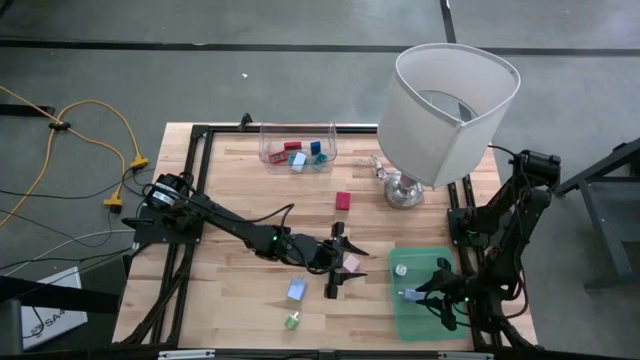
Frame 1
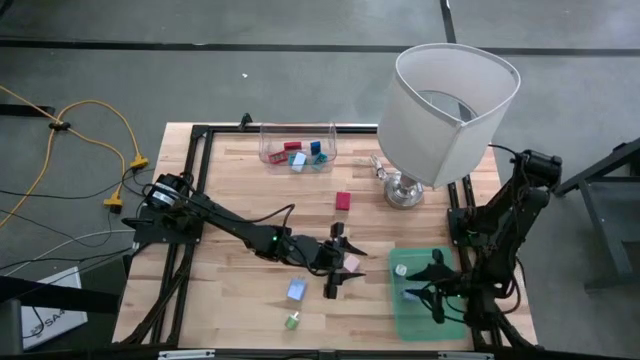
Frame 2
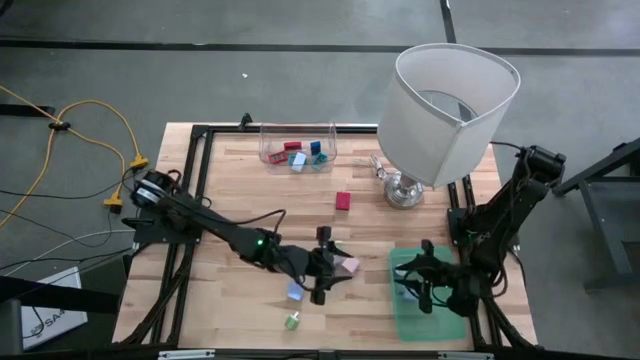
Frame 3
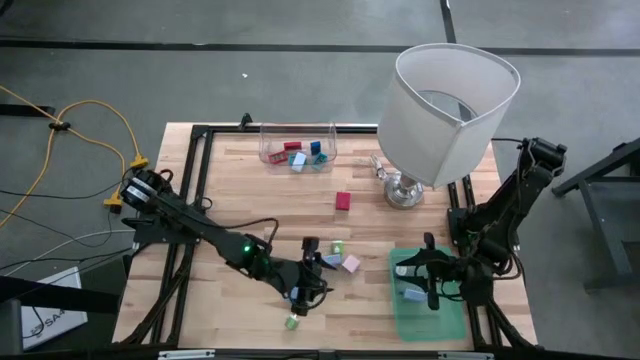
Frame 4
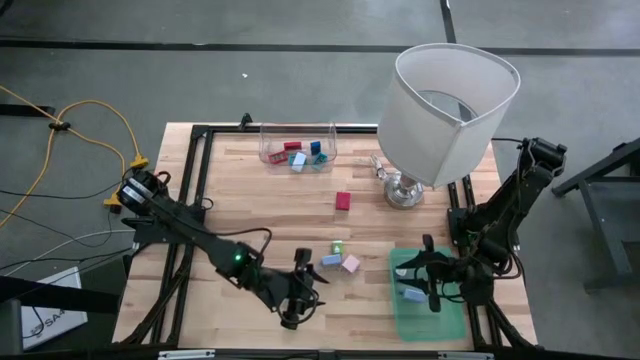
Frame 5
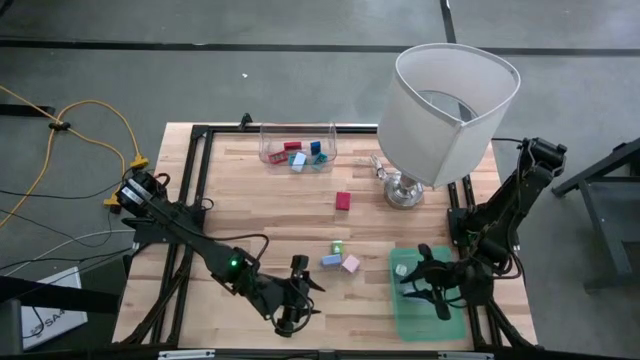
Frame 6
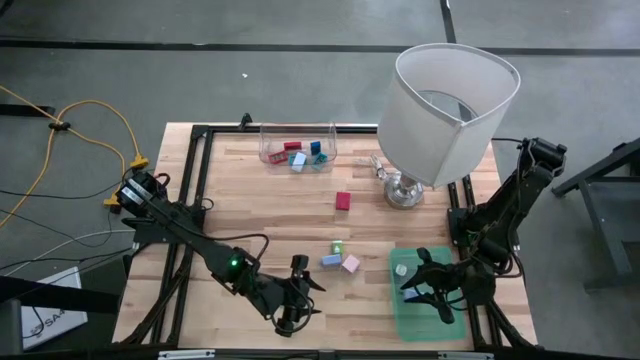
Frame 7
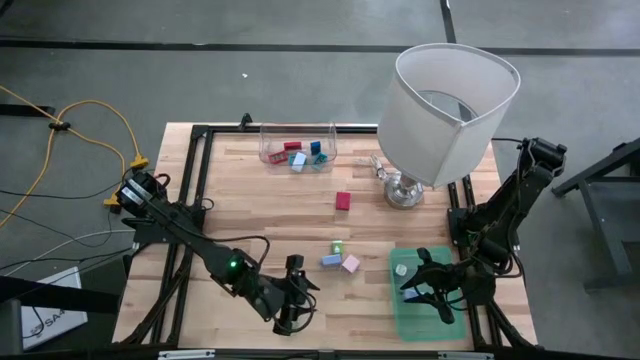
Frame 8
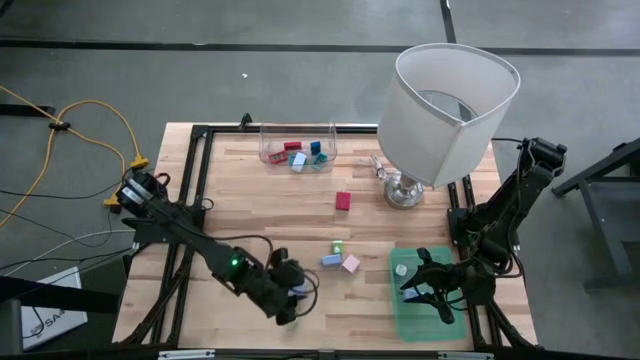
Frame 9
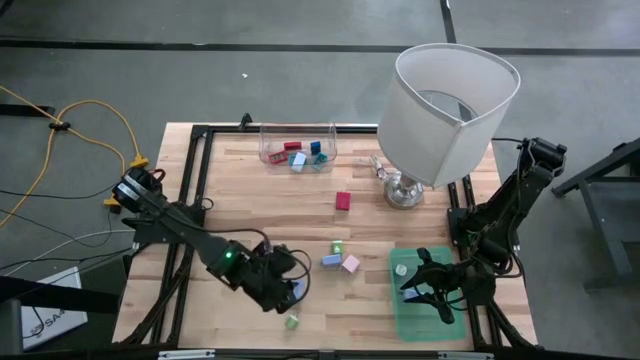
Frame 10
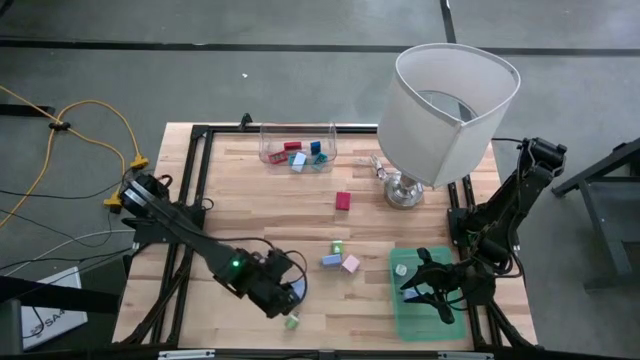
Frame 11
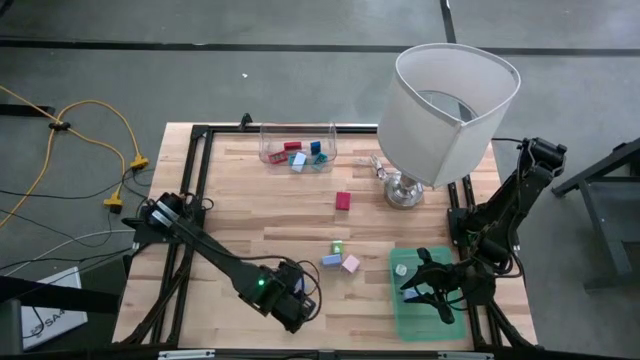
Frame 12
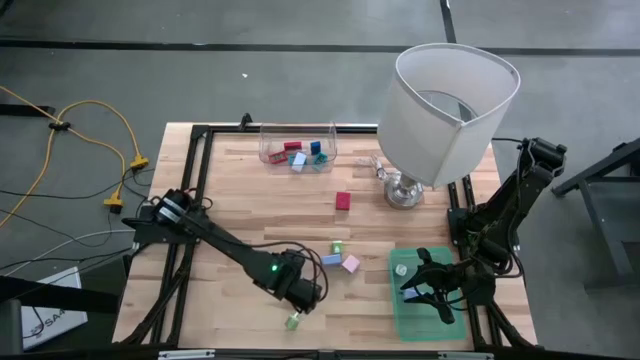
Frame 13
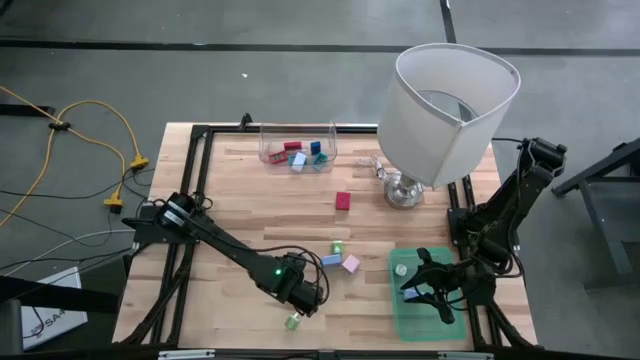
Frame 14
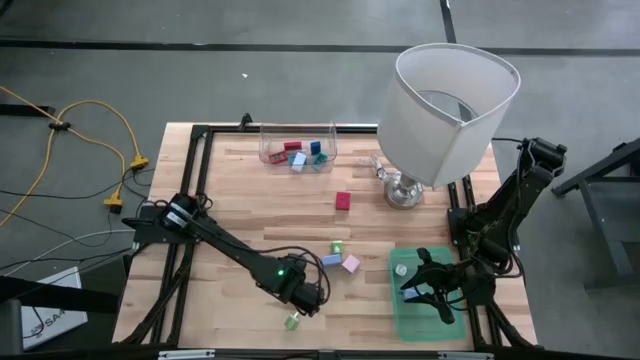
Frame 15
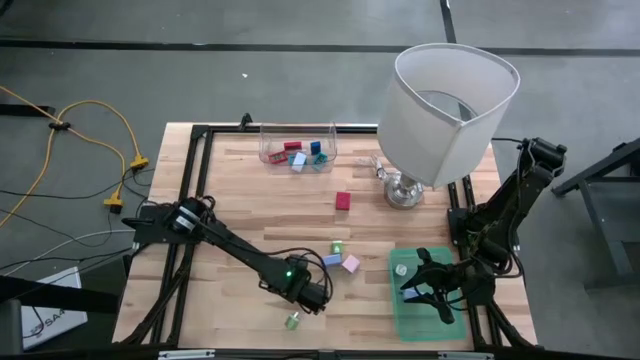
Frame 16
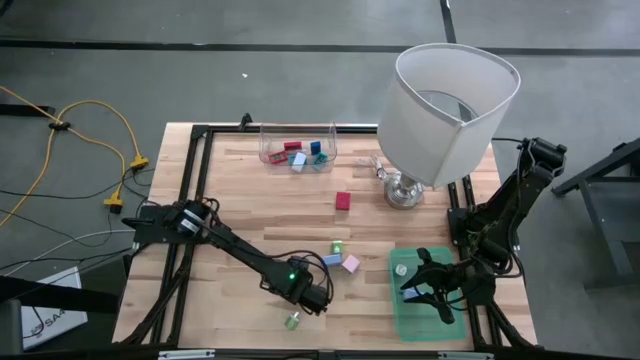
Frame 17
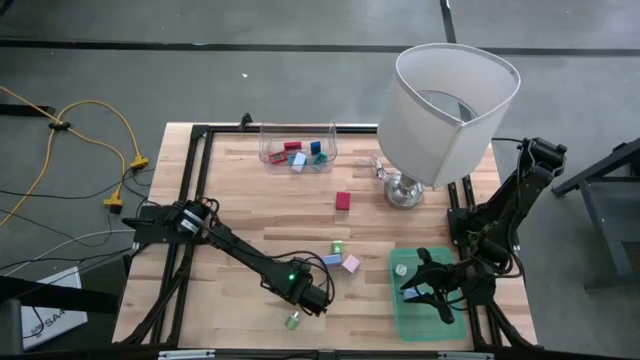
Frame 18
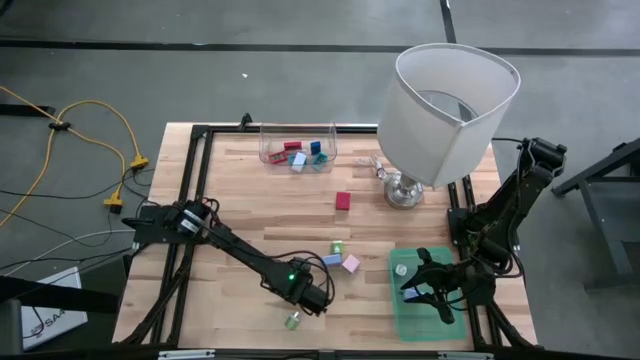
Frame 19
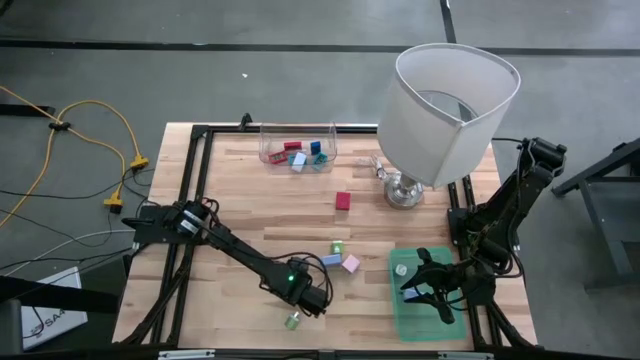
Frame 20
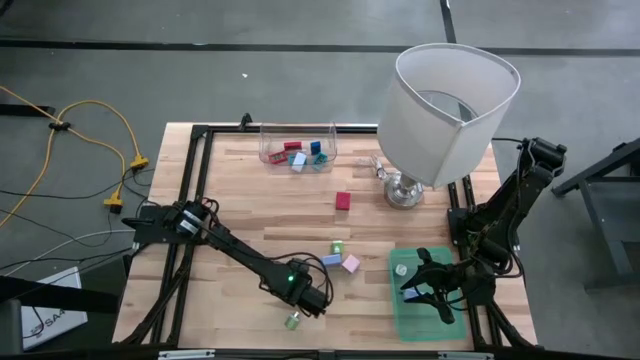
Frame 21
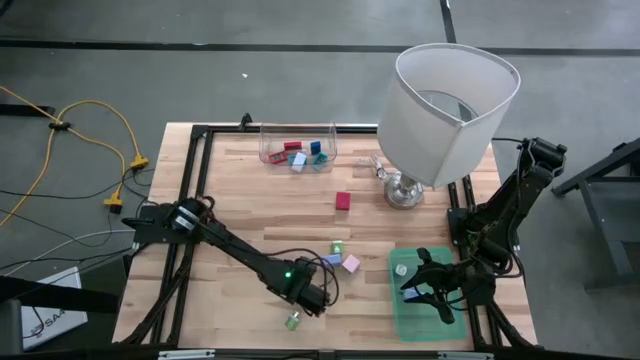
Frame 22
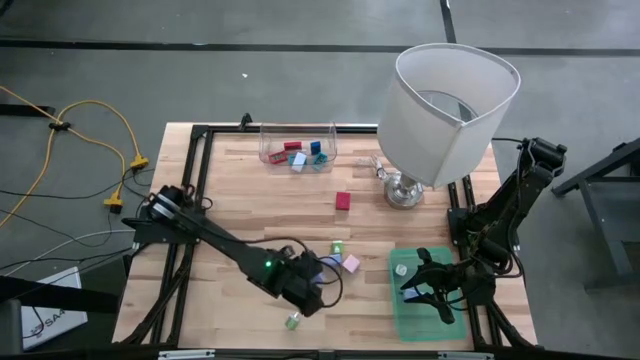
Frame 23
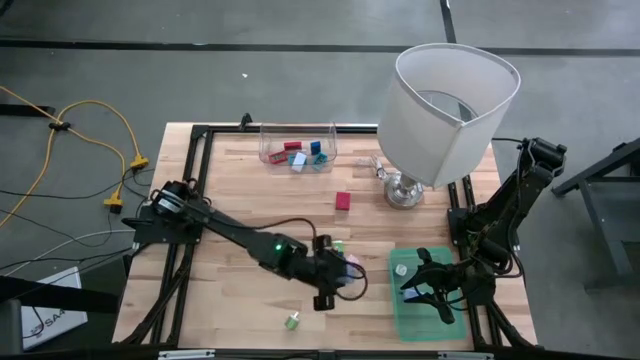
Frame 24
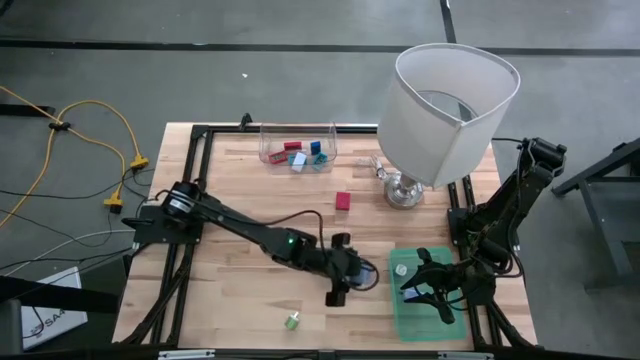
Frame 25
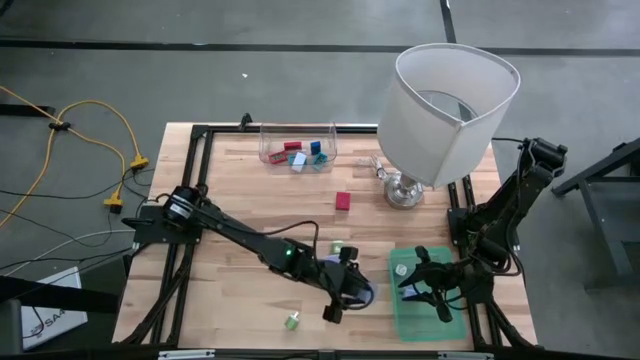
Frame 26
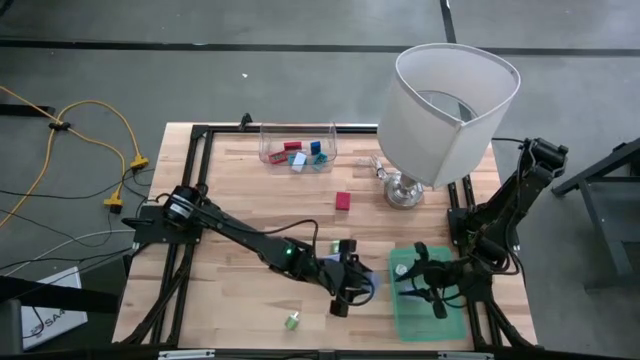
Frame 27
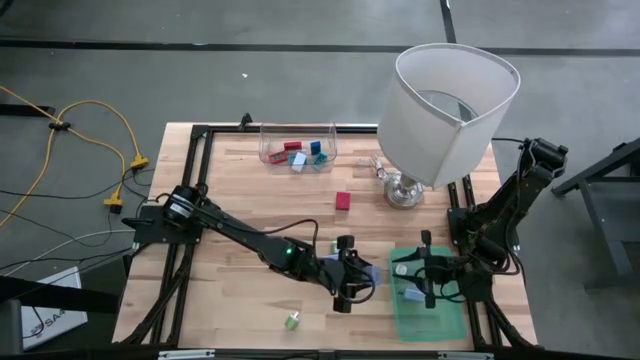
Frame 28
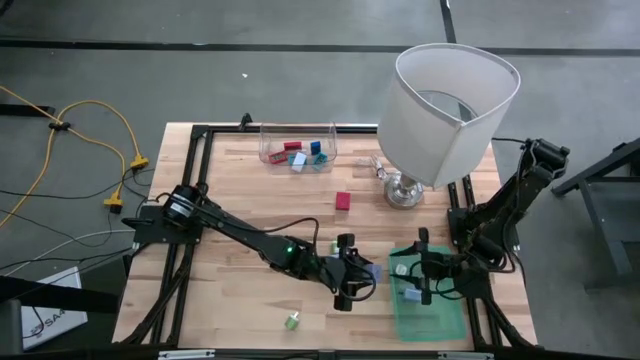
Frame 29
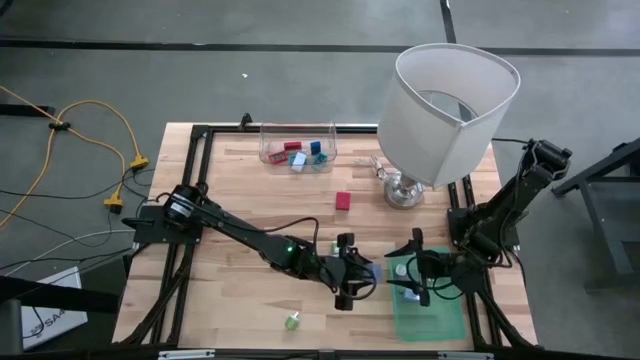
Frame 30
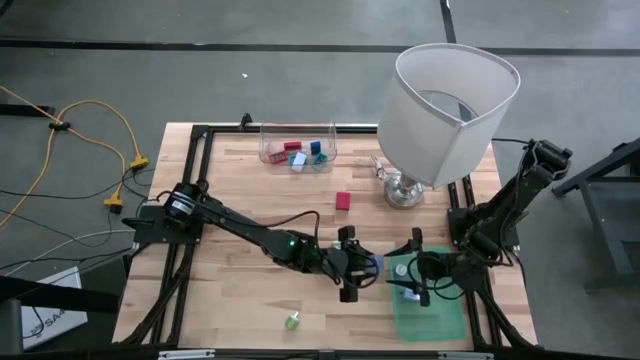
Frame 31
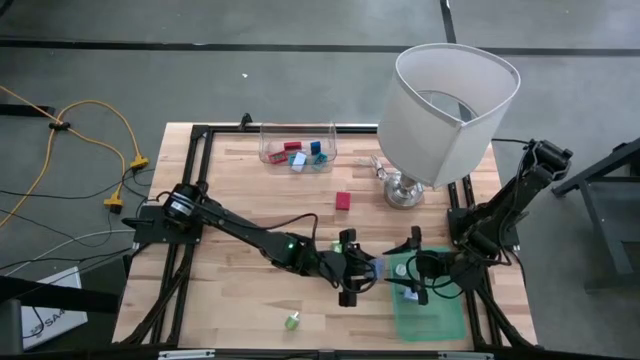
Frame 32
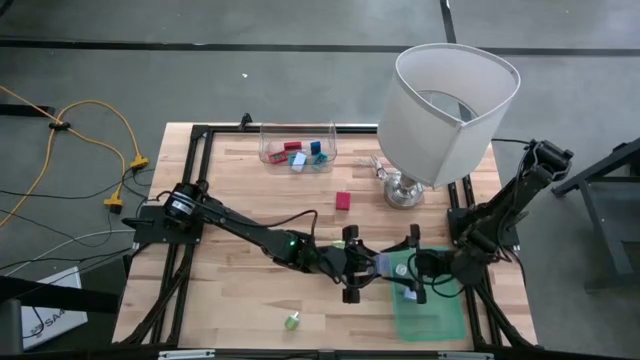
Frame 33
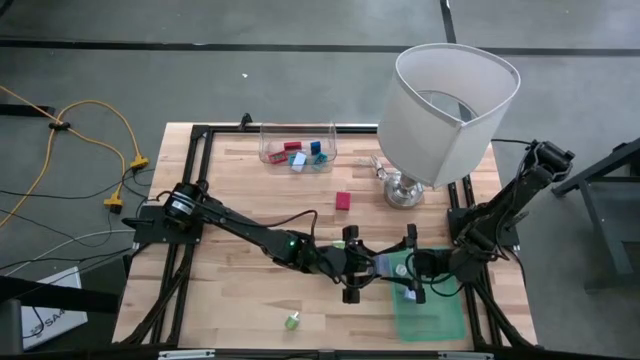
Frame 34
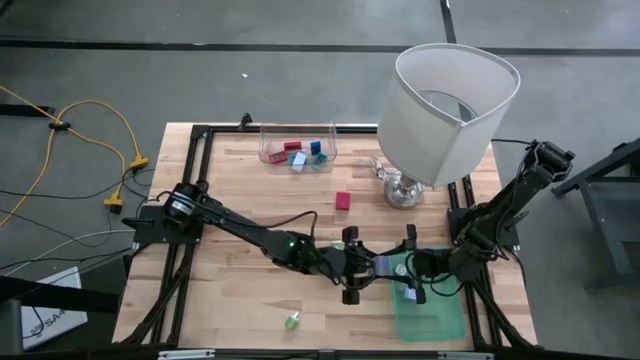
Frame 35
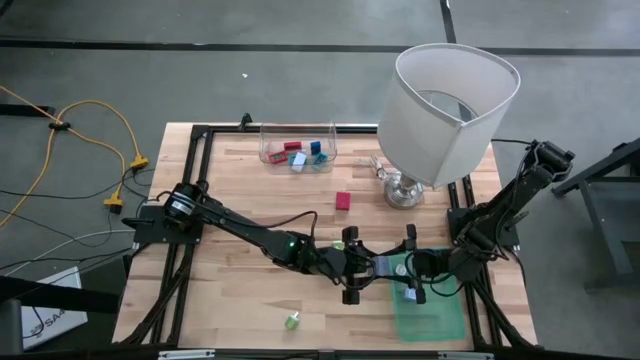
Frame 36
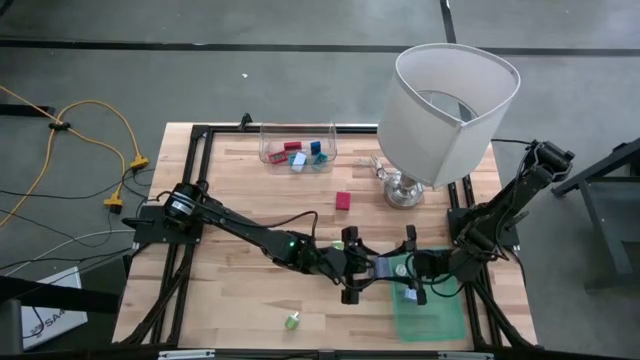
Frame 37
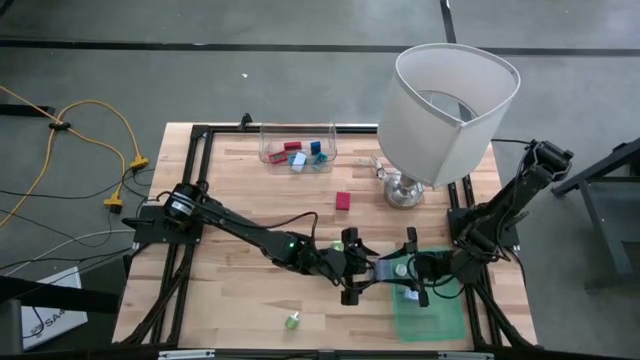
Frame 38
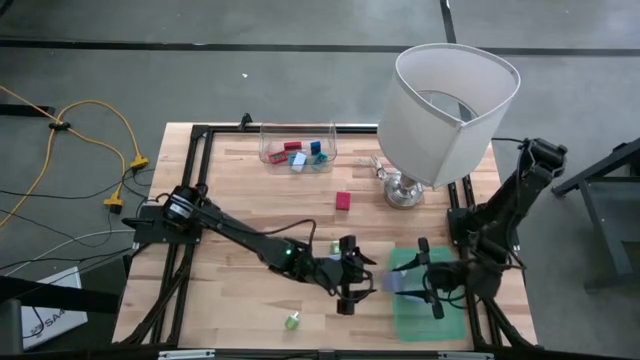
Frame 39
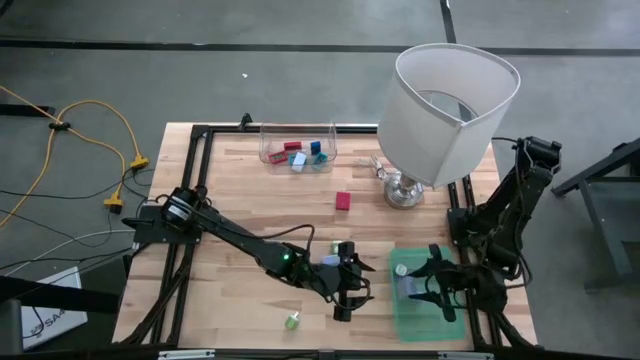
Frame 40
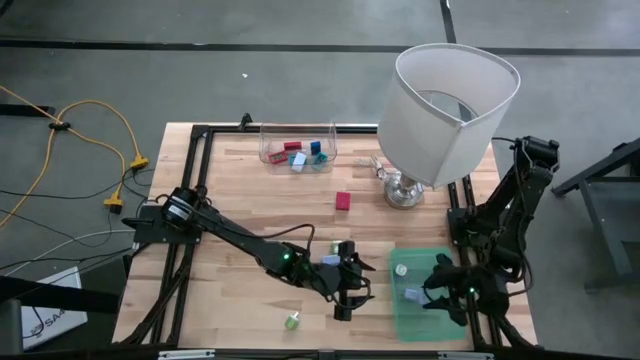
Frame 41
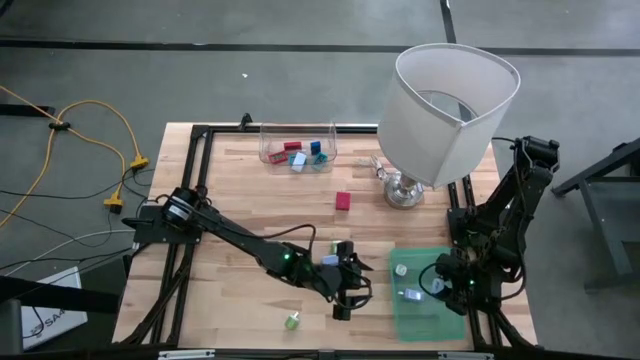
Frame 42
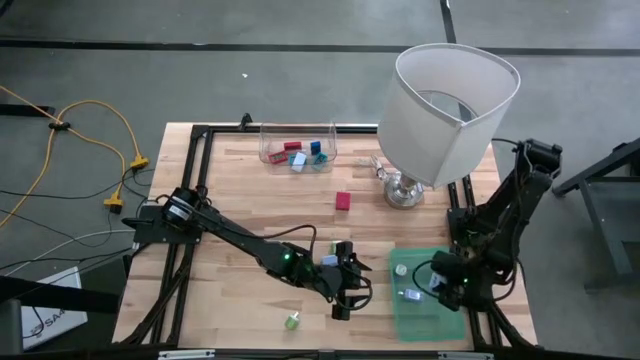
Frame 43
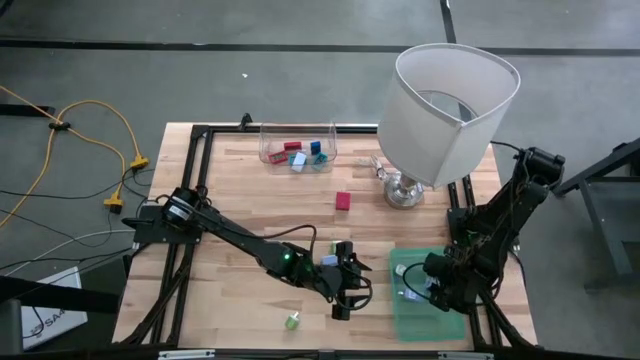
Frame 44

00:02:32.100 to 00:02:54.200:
Task: Pick & Place Office items
Put the bottom light blue charger adapter into the green bin
